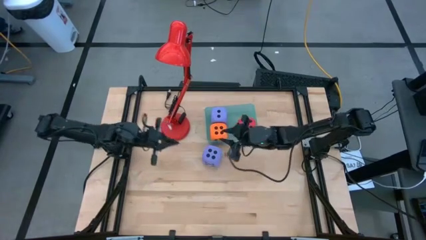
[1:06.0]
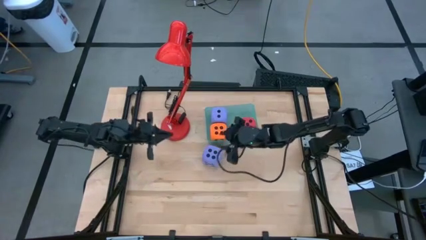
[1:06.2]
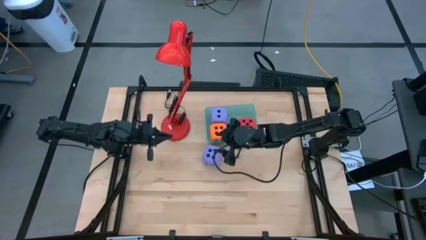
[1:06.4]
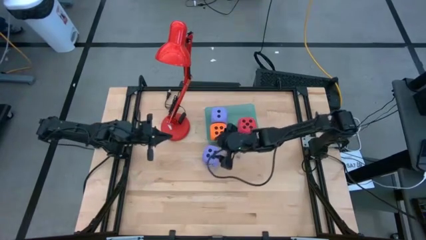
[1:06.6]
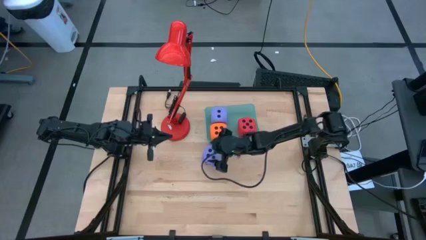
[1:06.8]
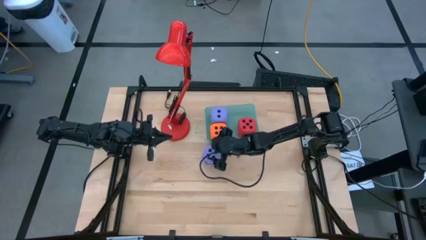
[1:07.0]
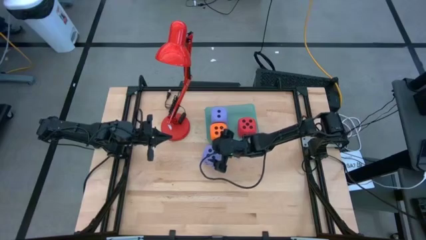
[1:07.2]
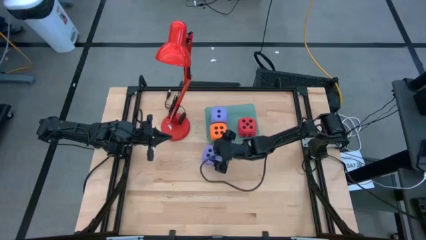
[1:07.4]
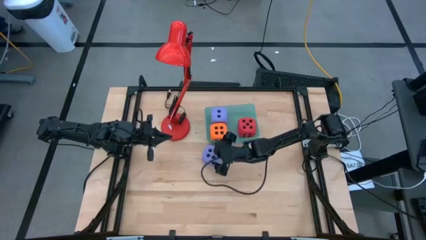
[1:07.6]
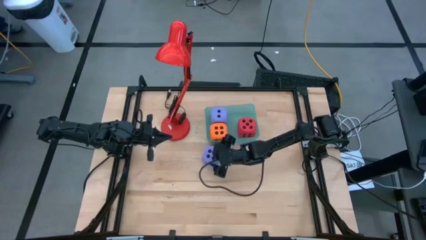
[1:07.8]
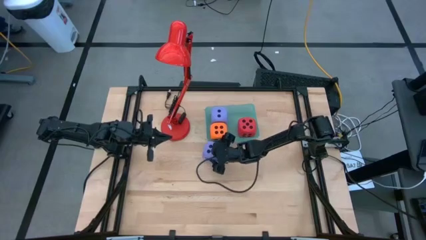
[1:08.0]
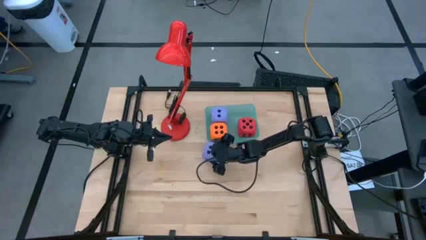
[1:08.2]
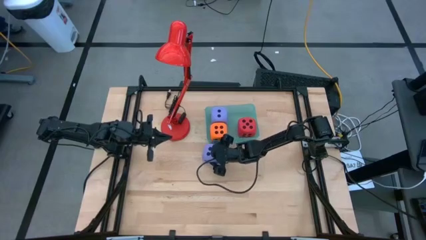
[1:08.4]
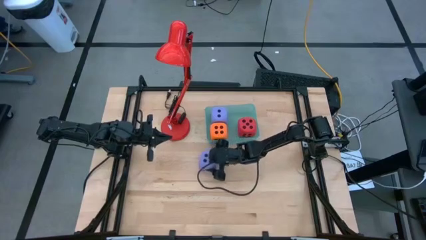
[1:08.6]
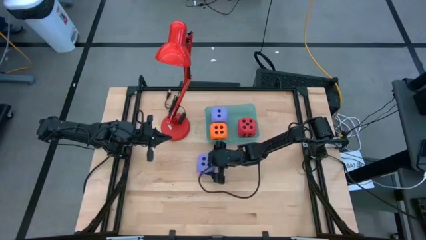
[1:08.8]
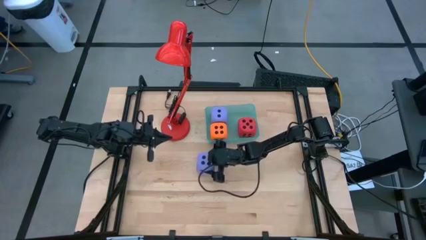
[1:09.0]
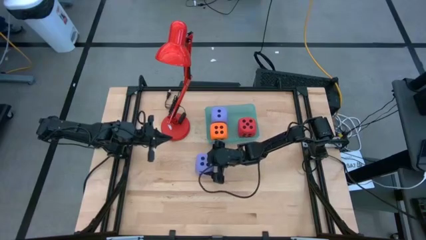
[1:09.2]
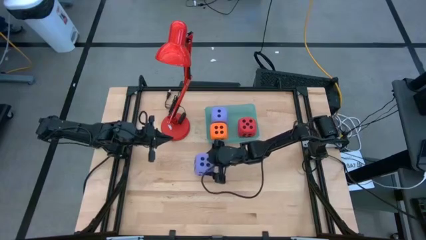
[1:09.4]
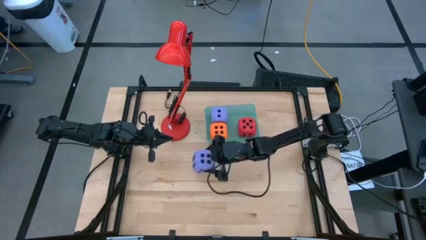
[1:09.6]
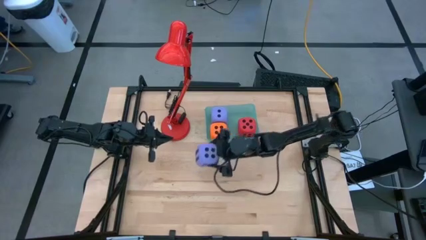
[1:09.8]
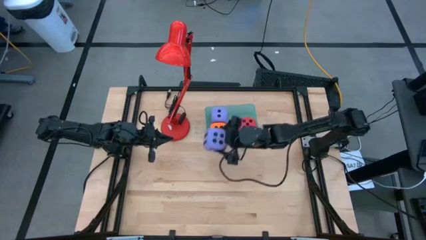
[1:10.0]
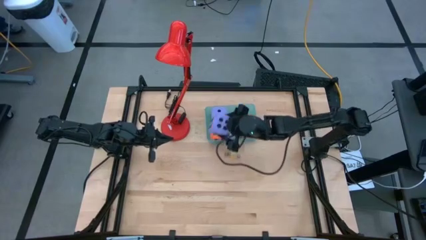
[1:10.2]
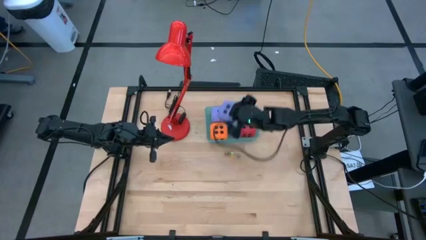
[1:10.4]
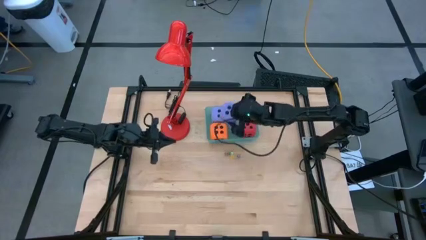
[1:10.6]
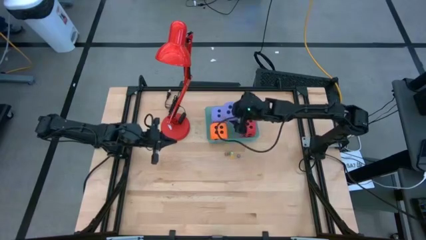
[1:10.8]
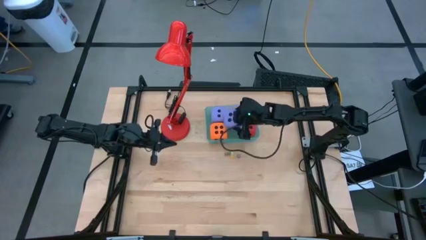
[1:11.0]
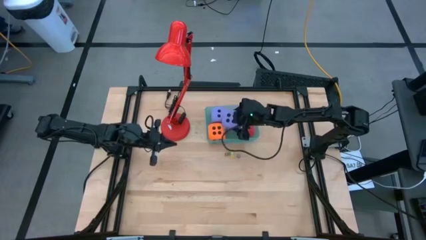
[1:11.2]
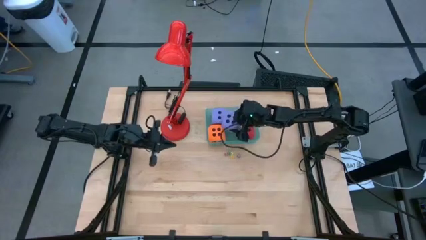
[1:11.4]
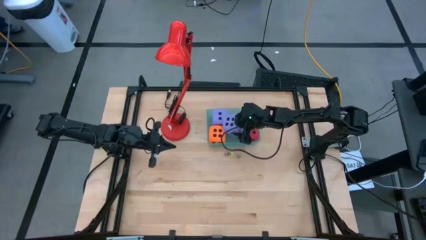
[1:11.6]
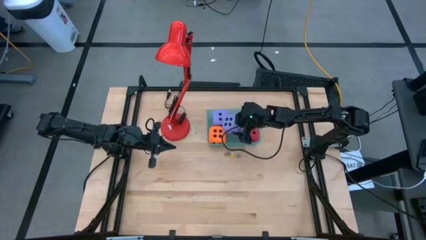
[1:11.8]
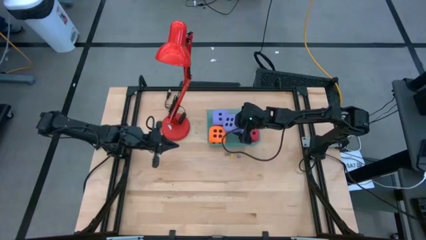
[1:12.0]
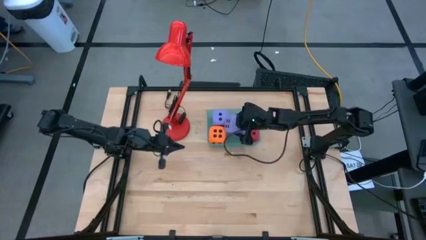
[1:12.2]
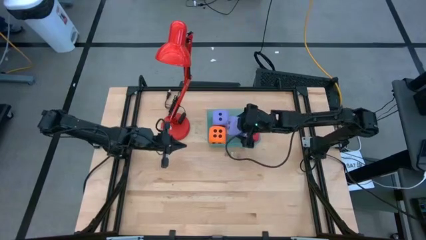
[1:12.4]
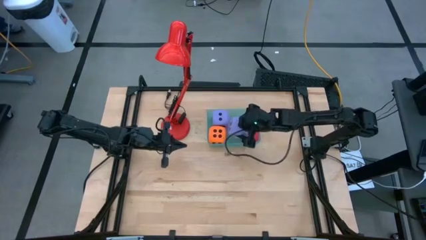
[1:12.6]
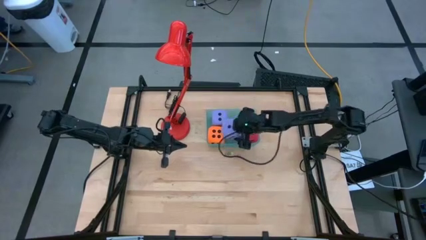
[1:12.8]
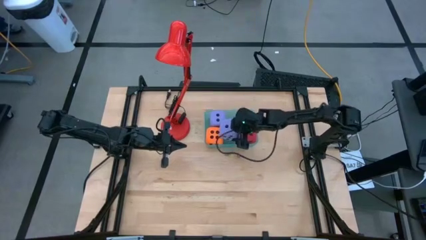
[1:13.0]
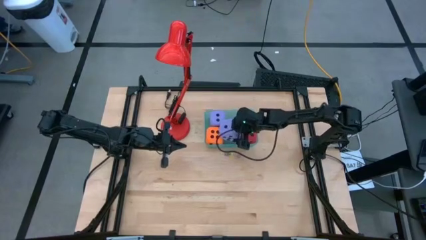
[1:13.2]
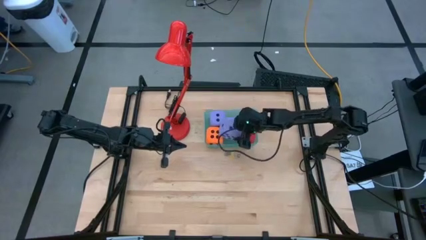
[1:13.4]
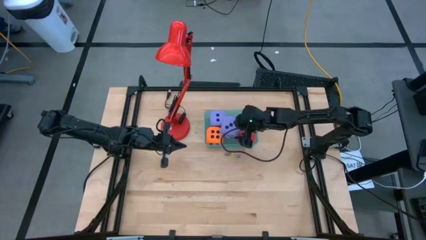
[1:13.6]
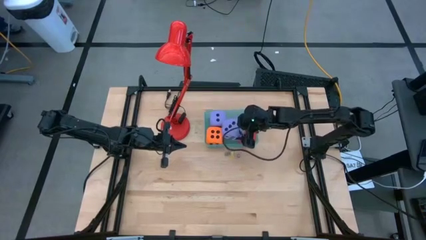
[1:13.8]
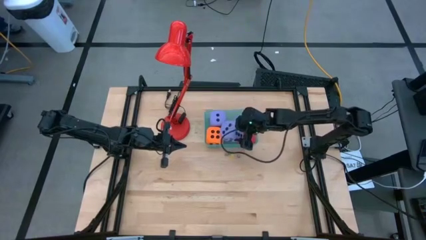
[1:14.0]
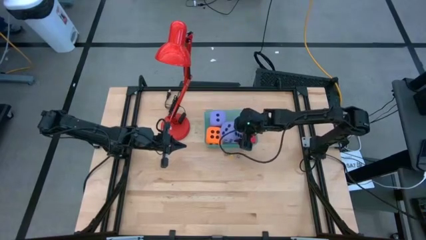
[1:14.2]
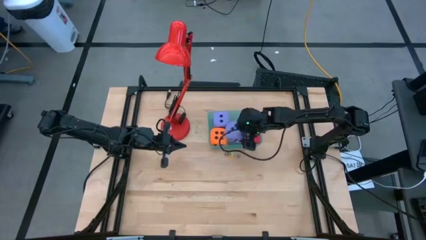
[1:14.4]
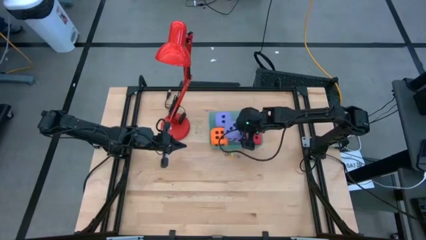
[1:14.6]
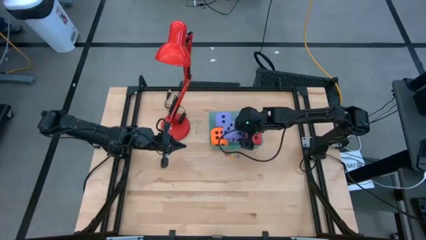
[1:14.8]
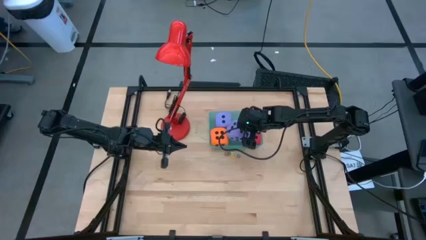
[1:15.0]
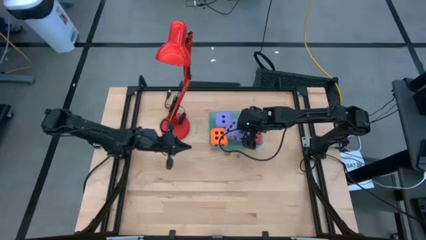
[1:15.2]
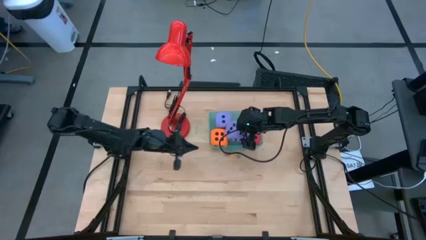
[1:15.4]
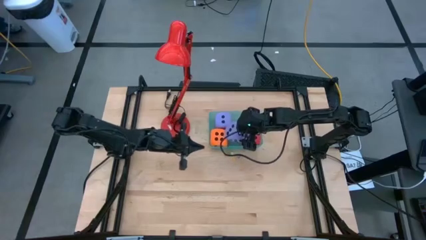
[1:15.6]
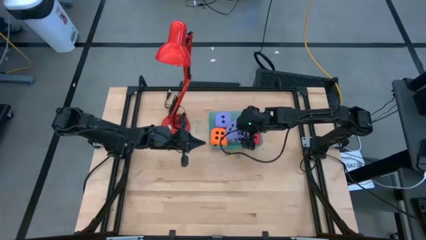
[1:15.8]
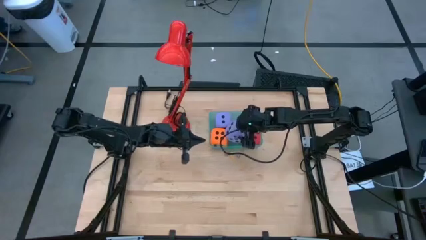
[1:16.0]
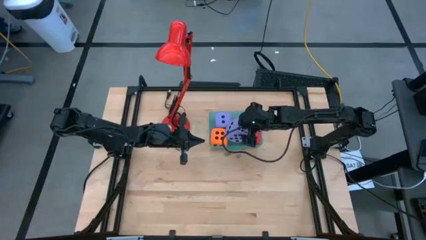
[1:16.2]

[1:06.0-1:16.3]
Task: Pick & Place Dice
Put the large purple dice into the bin

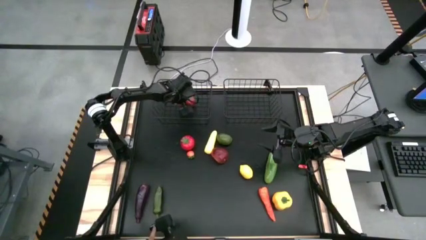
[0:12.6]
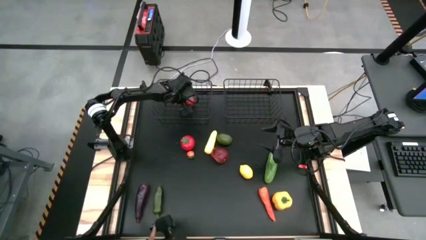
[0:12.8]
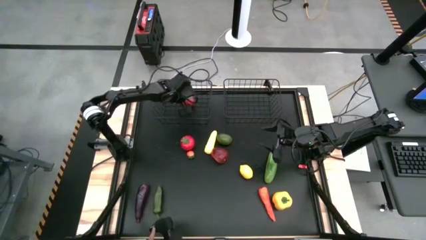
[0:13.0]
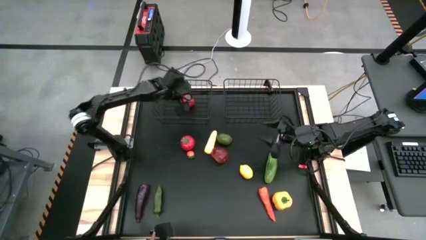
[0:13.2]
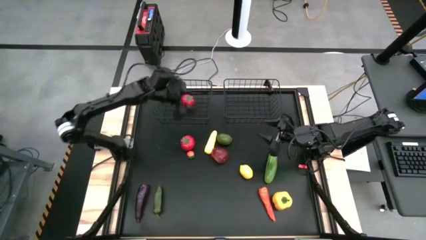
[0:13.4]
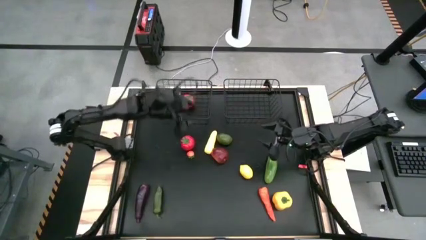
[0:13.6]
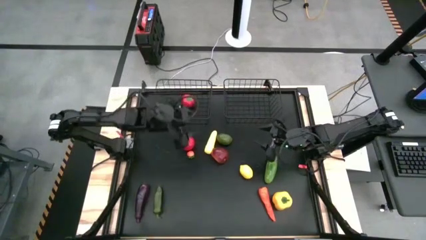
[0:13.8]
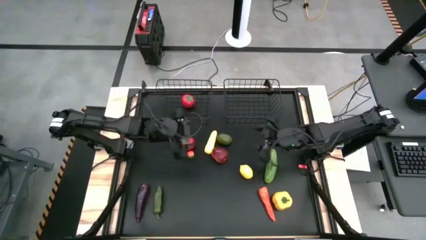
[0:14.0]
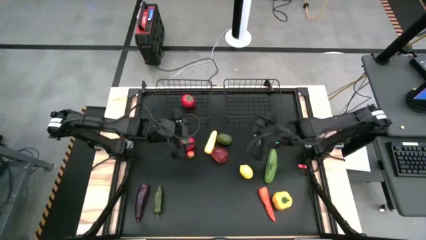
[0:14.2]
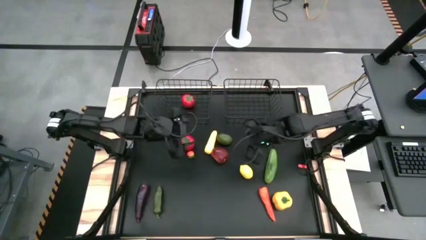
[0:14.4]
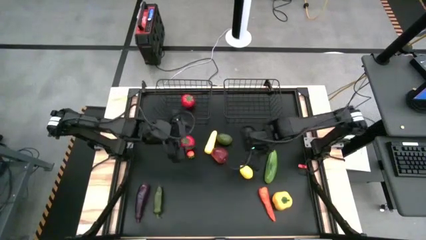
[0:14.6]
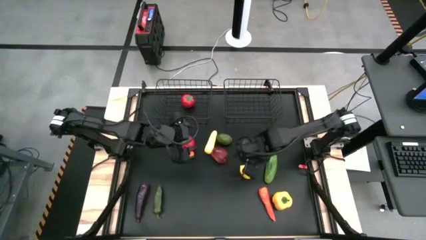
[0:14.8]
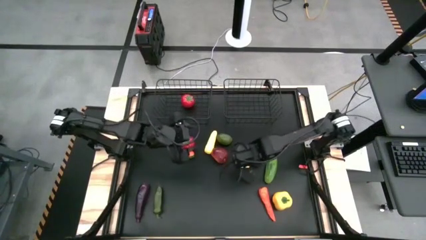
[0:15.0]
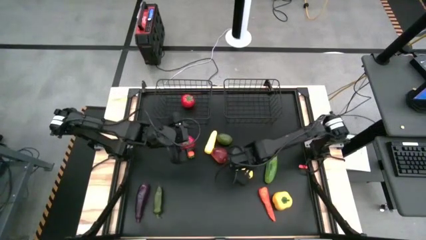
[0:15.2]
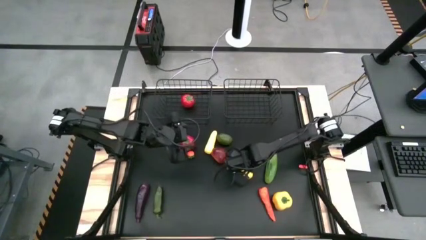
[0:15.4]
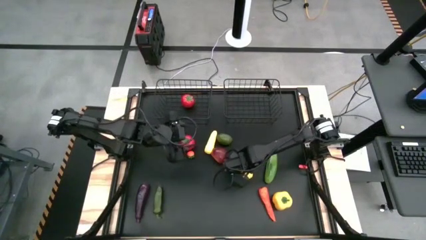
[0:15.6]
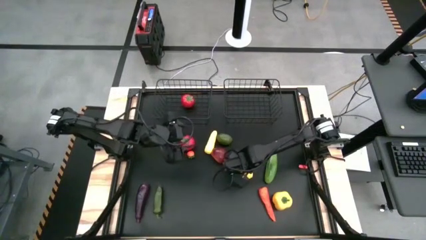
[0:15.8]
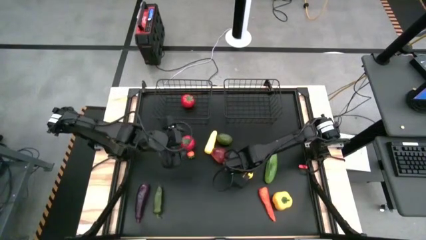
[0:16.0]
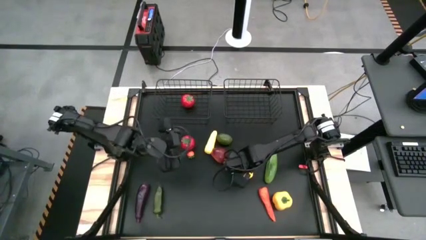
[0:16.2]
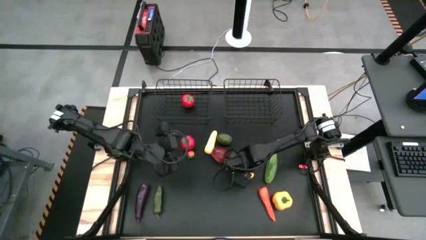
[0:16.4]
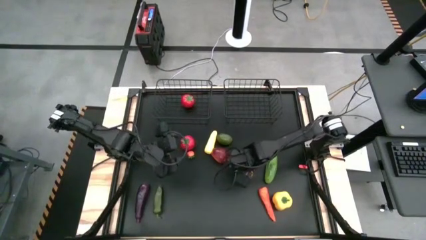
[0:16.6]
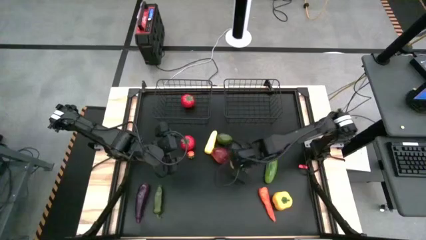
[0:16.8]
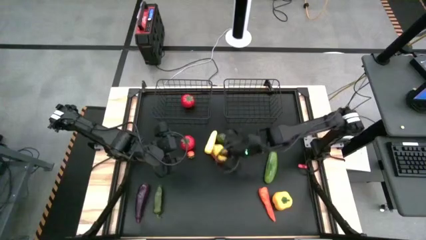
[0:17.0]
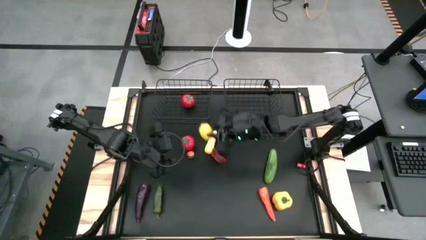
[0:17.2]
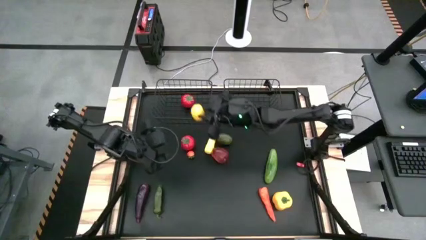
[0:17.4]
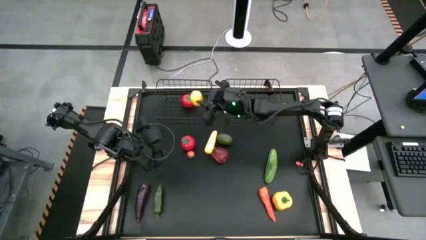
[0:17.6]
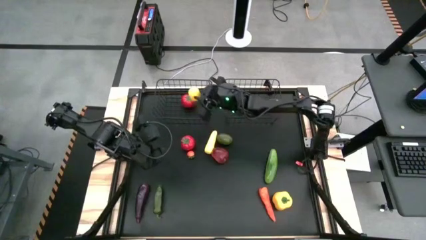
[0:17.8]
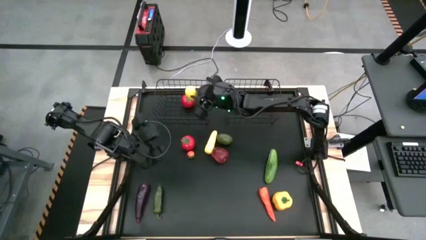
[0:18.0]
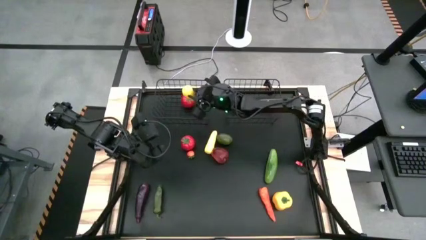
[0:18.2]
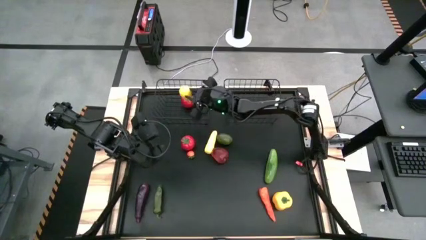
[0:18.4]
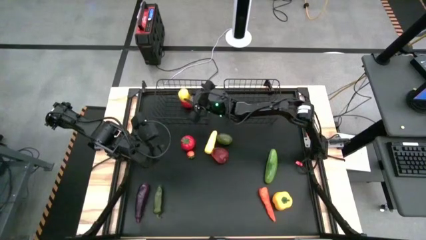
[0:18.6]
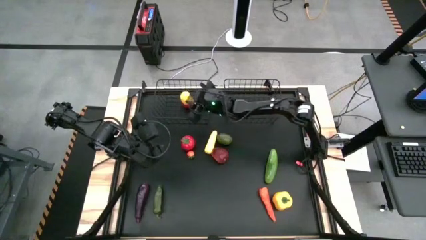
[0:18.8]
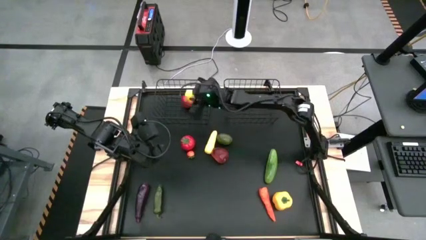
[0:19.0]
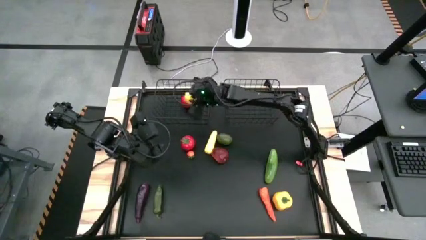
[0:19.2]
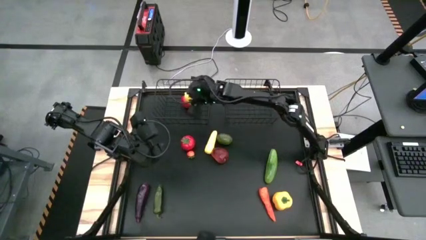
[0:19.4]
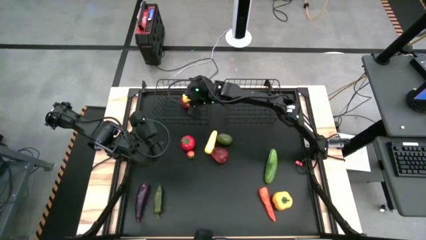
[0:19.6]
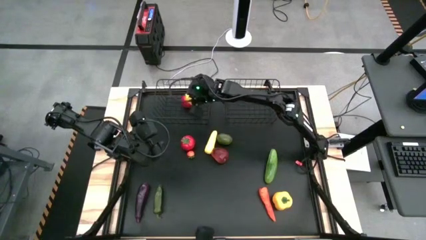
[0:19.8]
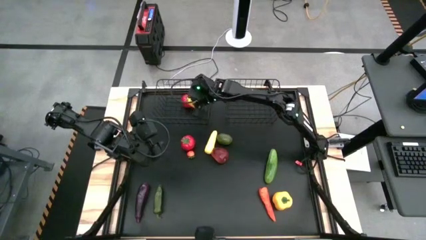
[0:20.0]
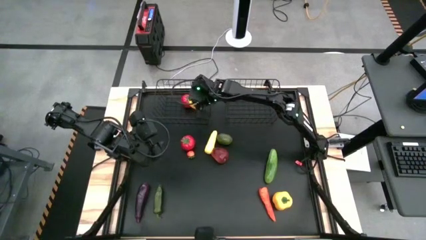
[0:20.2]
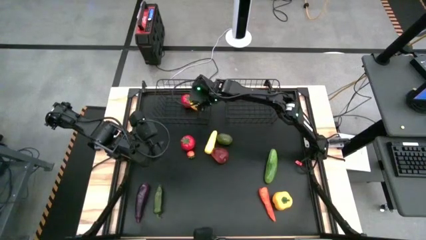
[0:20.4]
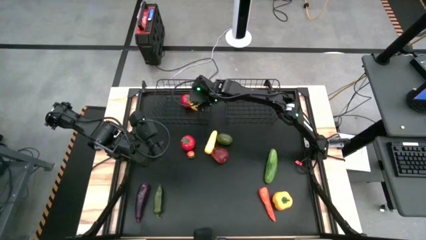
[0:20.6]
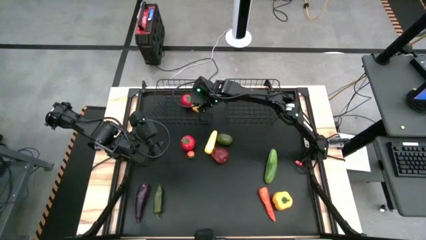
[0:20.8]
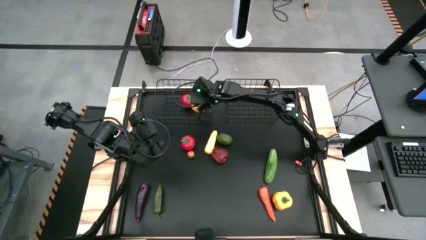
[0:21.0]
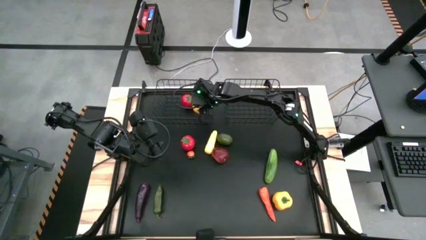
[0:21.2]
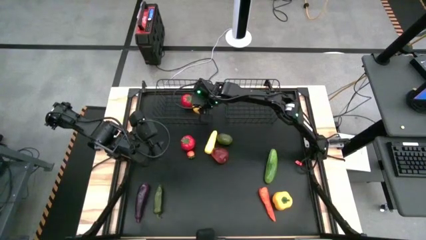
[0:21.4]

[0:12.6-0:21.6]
Task: Sort produce into baskets
Put the lemon into the left wire basket
